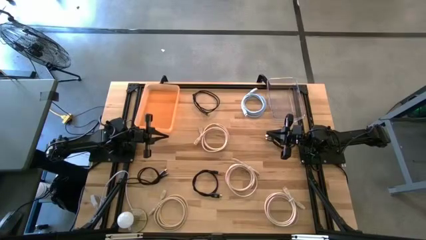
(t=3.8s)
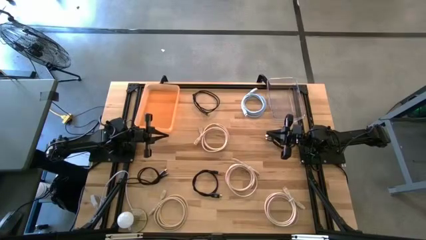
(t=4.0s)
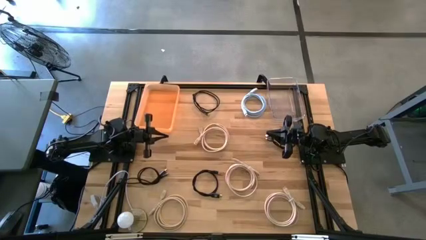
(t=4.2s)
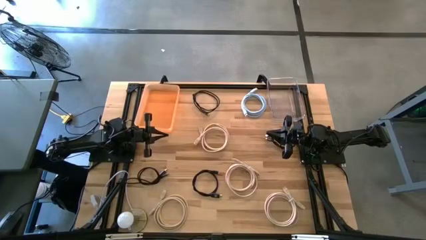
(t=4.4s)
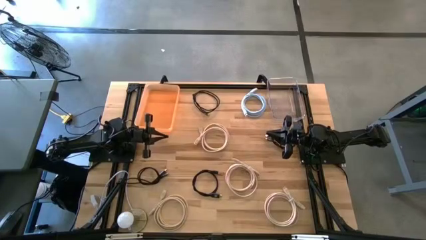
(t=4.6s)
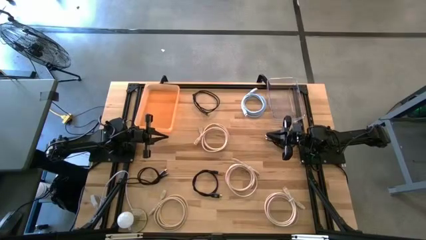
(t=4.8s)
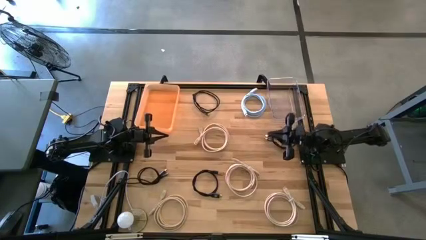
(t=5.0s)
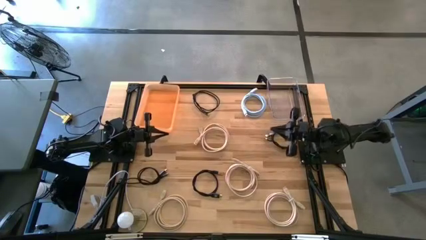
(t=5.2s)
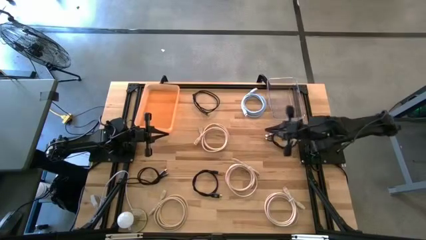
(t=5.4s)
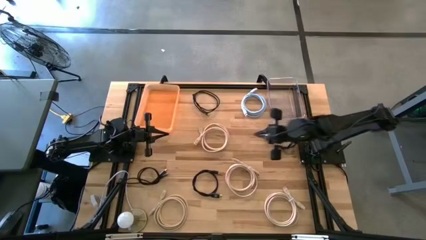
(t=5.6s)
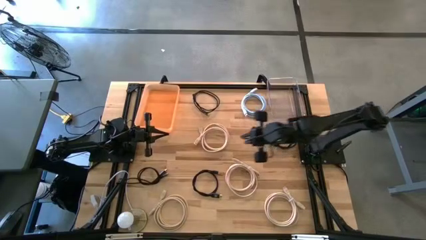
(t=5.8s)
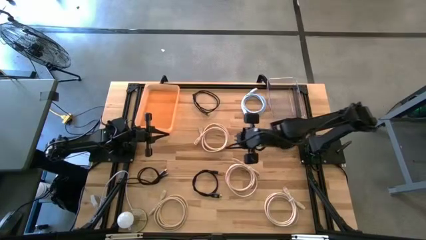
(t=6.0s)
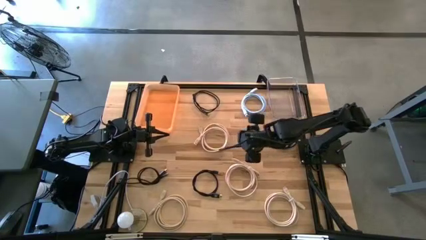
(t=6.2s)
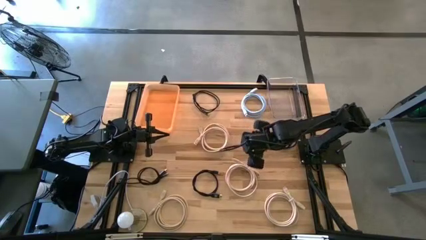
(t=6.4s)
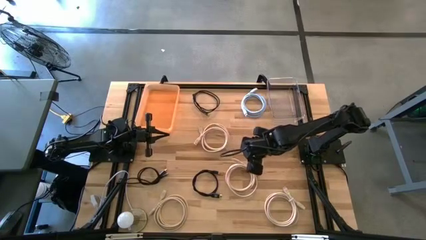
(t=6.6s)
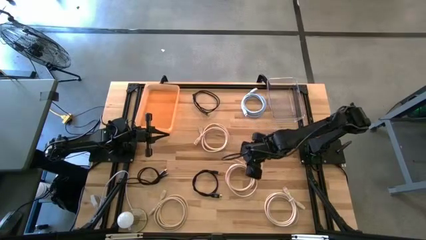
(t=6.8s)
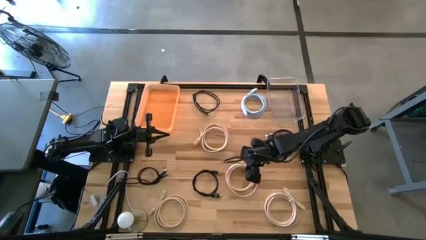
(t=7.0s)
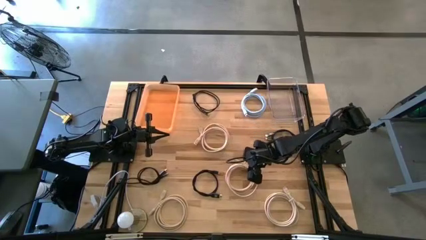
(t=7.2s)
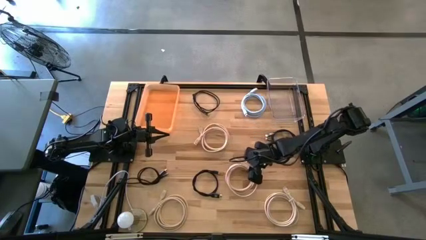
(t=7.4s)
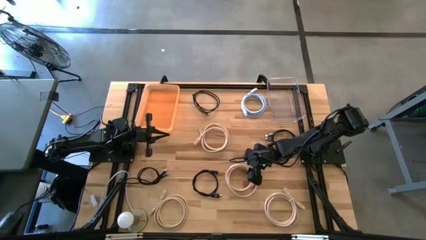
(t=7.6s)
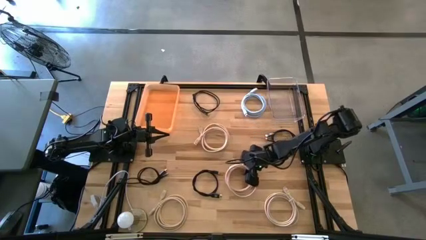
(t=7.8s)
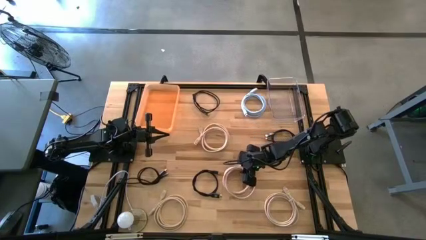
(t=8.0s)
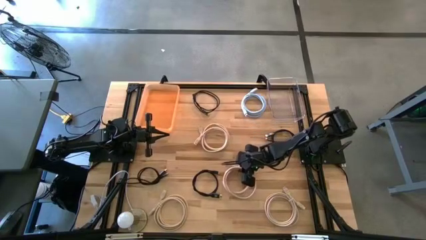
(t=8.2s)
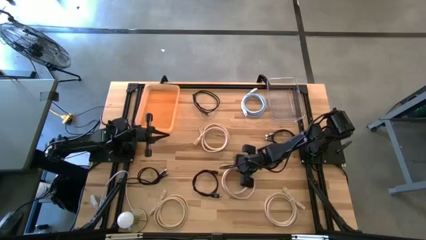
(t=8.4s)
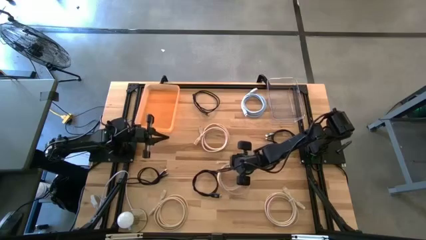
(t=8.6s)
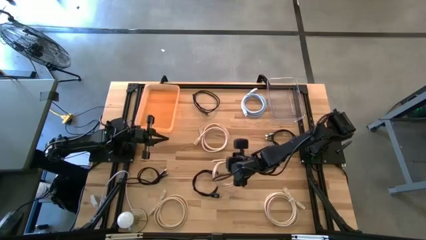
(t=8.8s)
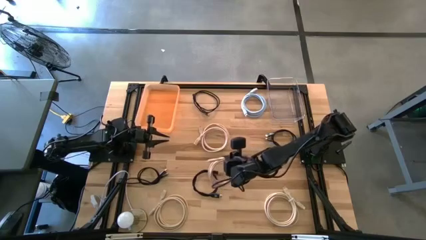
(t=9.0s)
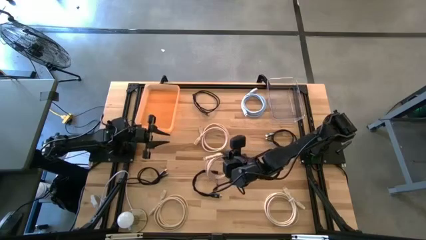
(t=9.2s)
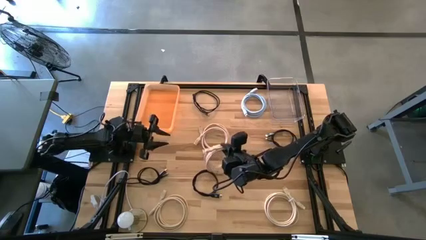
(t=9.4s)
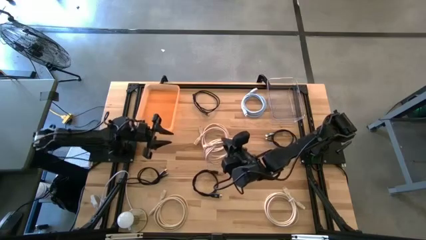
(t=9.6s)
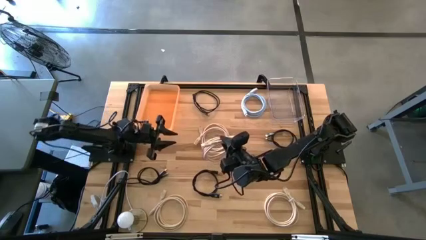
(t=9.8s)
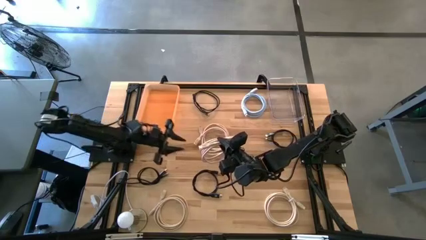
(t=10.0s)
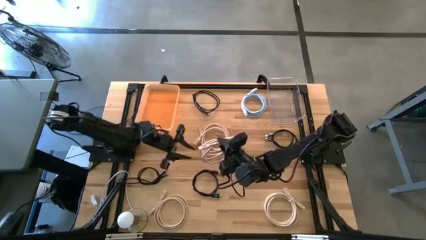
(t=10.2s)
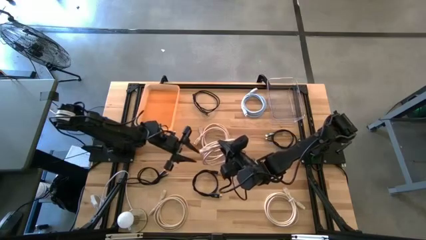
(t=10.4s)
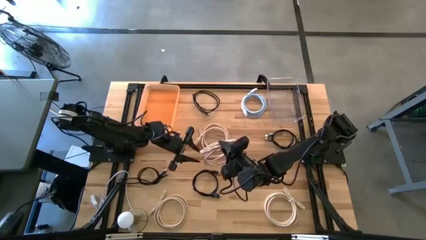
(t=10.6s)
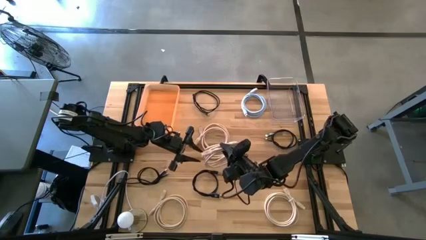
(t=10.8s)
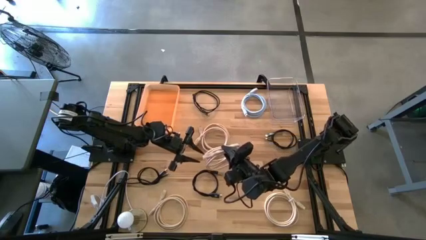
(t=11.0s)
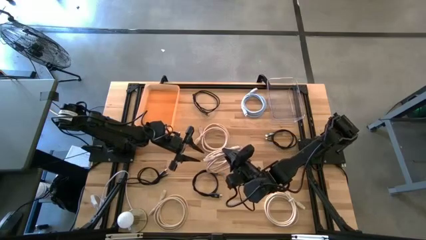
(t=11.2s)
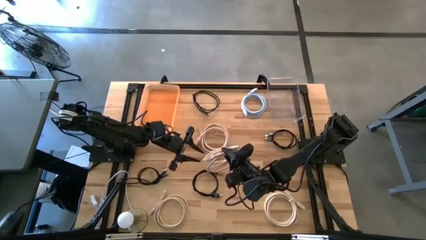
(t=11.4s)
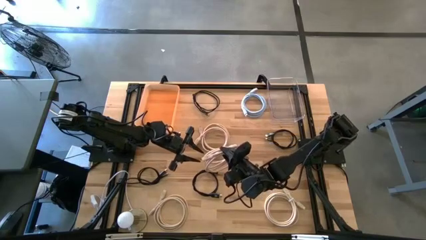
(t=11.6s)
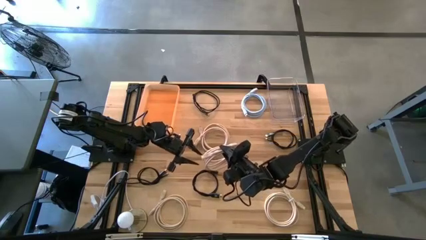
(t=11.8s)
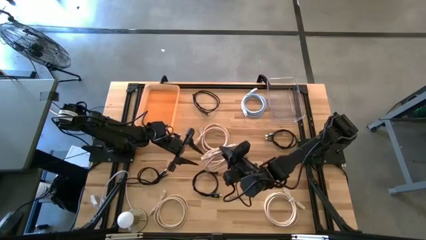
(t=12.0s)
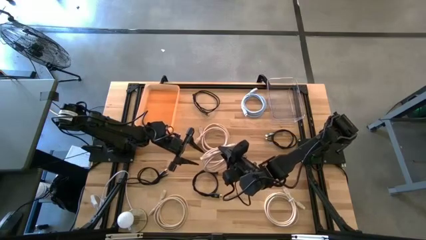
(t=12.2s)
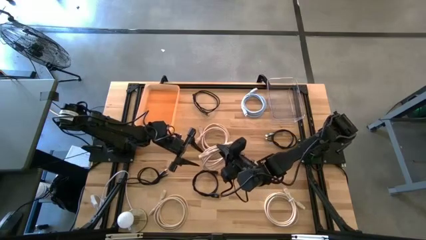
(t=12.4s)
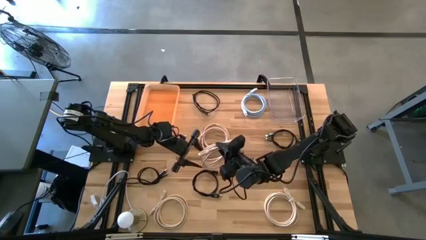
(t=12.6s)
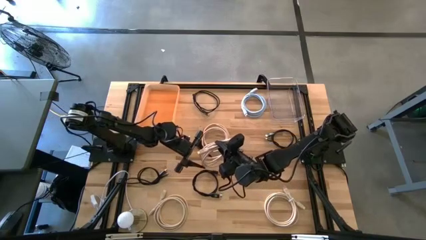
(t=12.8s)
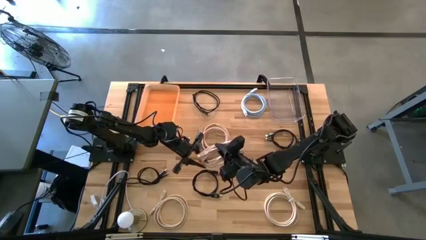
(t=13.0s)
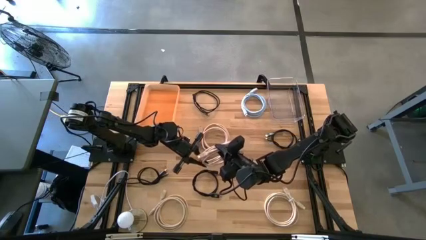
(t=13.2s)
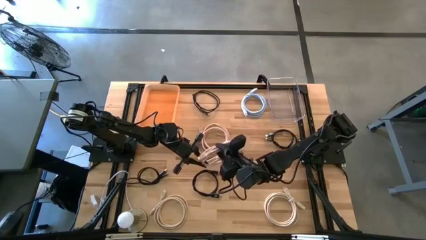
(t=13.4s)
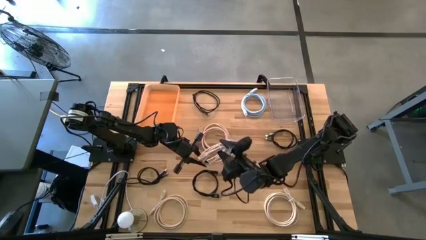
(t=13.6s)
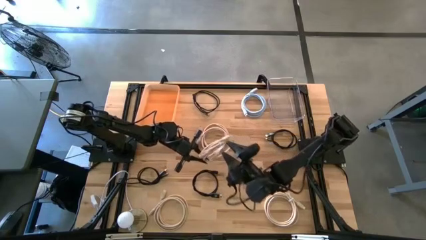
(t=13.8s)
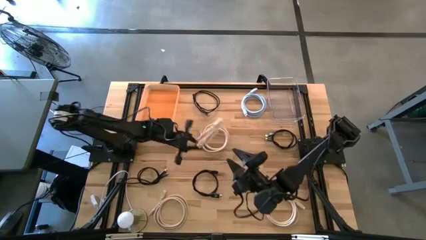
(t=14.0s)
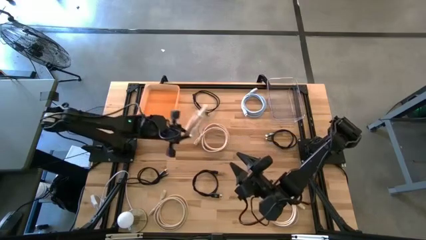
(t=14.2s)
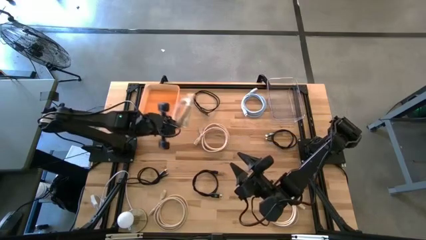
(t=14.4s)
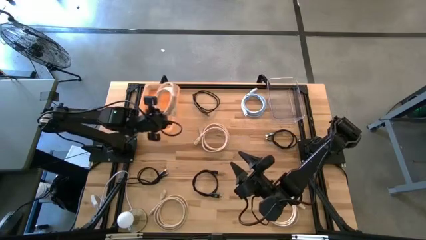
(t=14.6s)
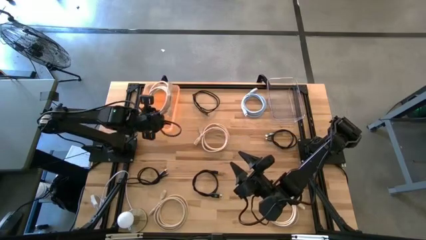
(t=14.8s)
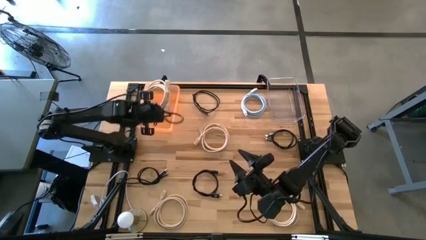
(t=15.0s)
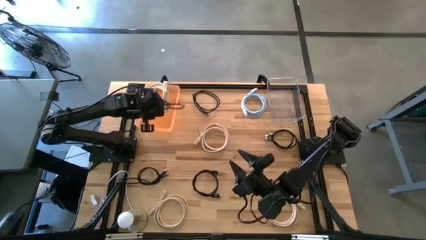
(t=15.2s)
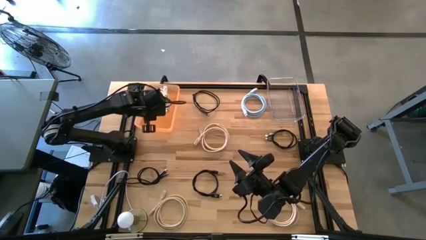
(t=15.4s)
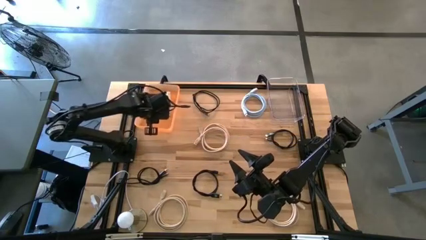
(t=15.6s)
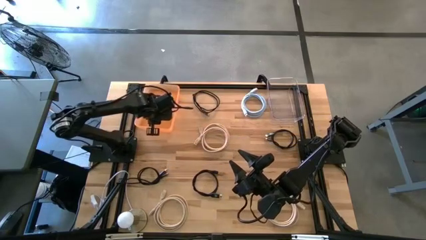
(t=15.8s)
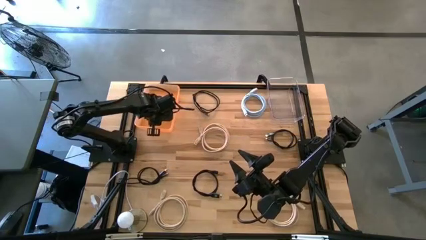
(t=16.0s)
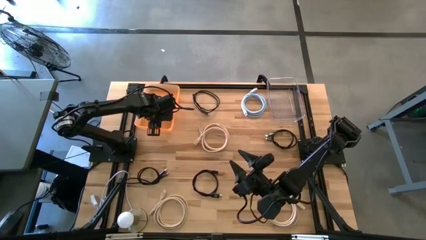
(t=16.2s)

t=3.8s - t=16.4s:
Task: Sort HDMI cables
Put the brown HDMI cable into the orange bin
